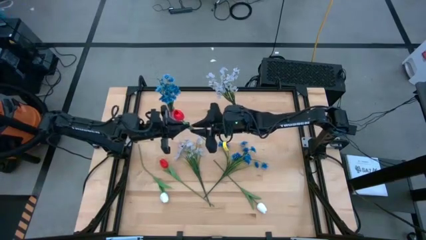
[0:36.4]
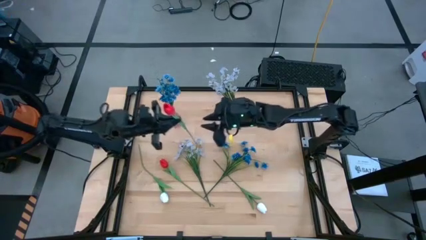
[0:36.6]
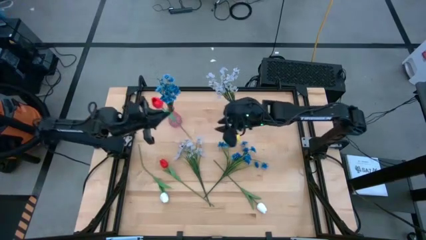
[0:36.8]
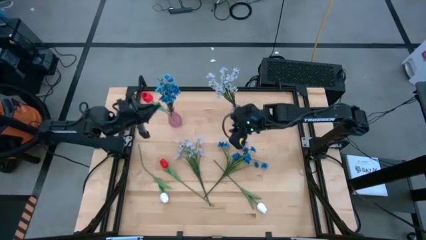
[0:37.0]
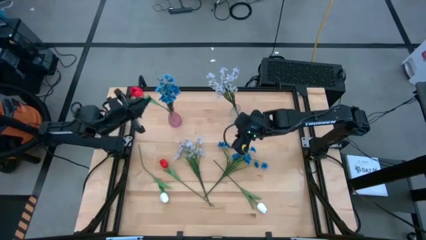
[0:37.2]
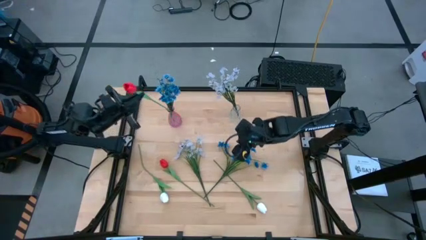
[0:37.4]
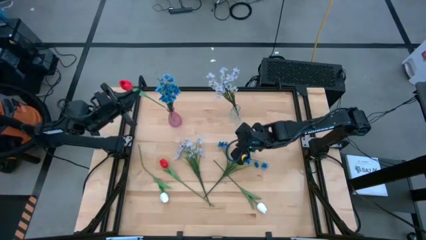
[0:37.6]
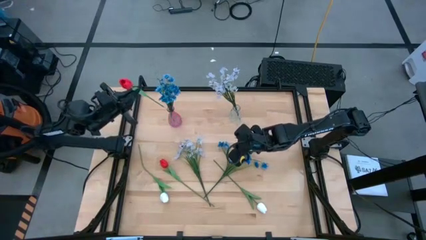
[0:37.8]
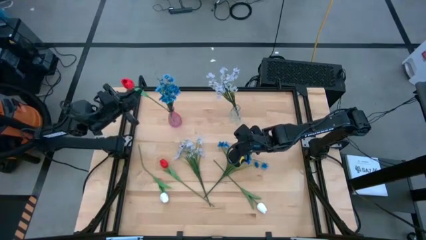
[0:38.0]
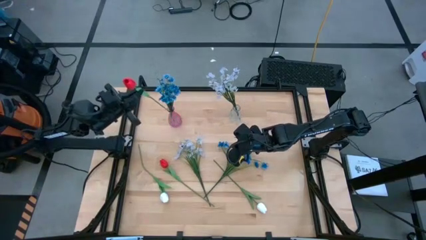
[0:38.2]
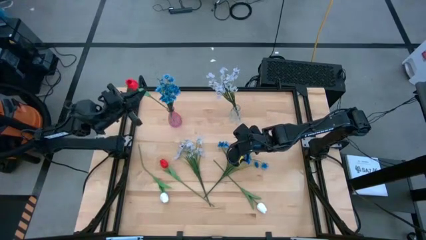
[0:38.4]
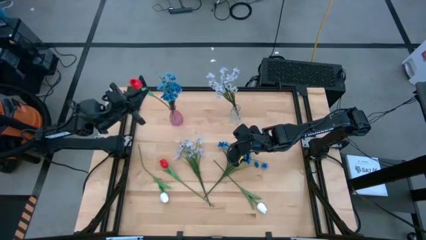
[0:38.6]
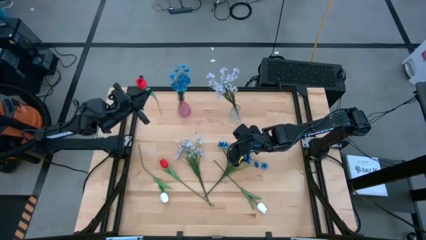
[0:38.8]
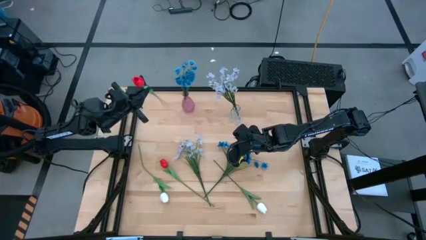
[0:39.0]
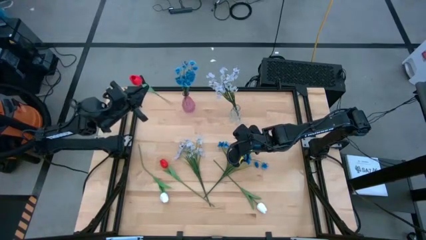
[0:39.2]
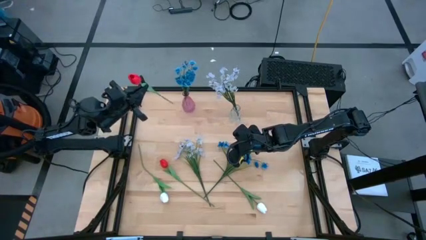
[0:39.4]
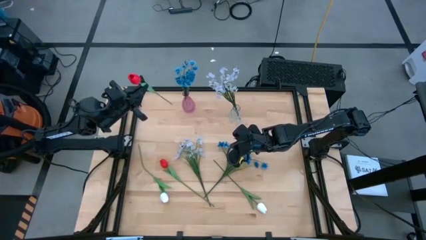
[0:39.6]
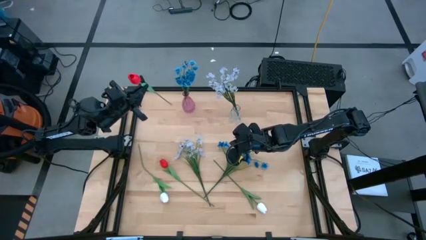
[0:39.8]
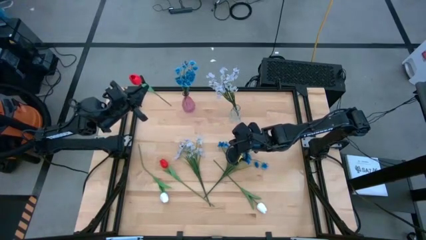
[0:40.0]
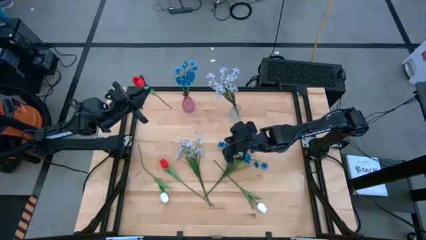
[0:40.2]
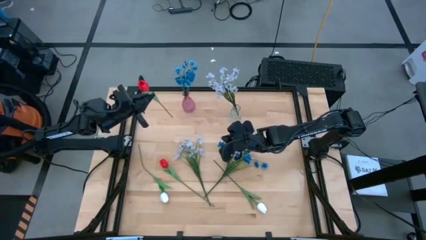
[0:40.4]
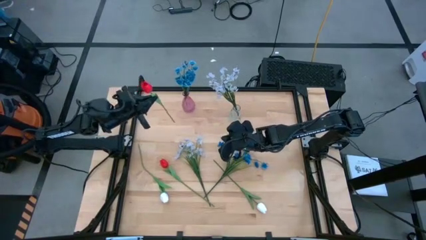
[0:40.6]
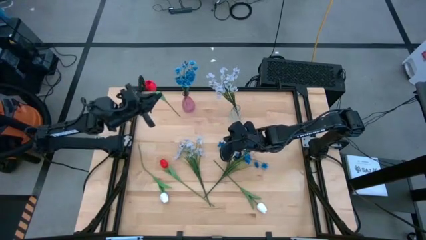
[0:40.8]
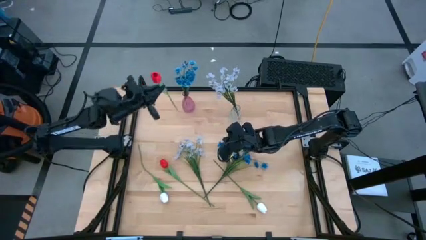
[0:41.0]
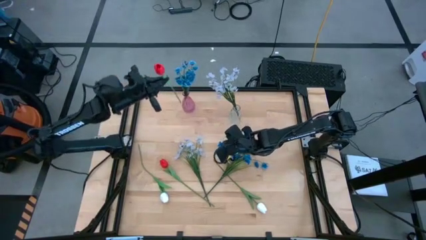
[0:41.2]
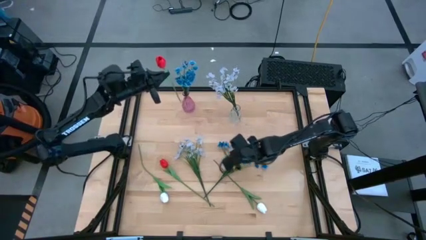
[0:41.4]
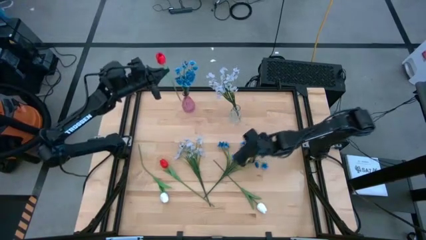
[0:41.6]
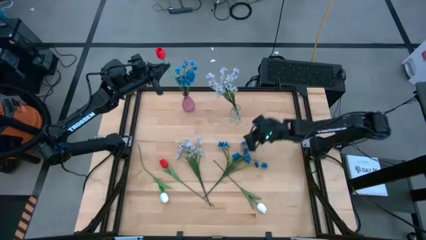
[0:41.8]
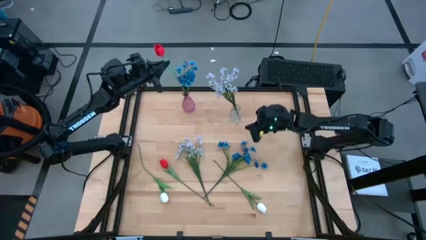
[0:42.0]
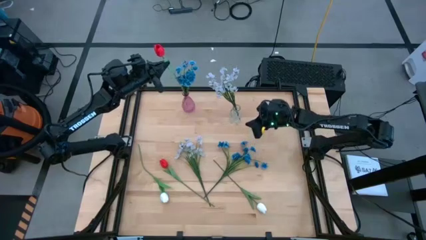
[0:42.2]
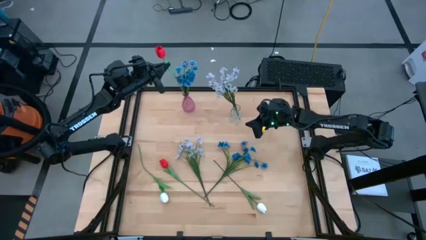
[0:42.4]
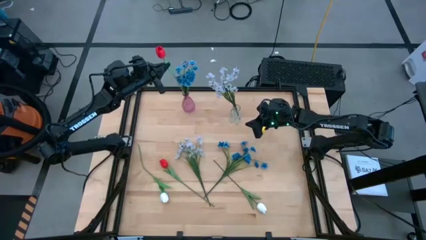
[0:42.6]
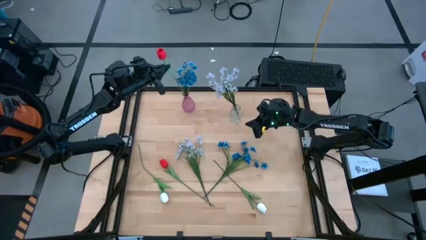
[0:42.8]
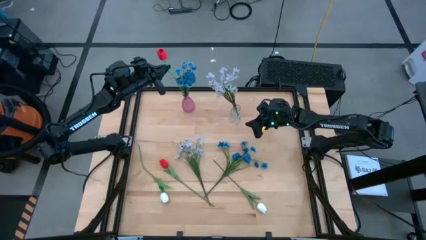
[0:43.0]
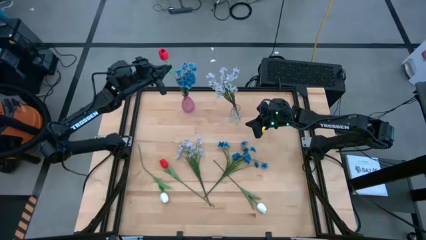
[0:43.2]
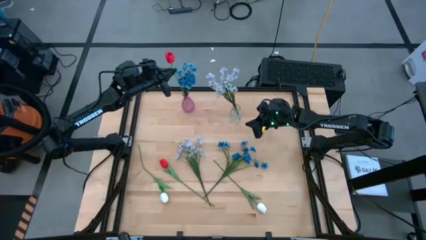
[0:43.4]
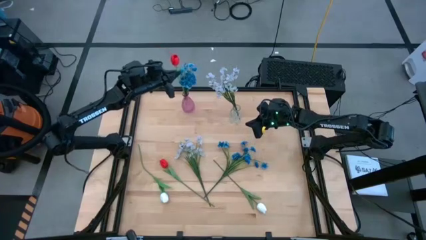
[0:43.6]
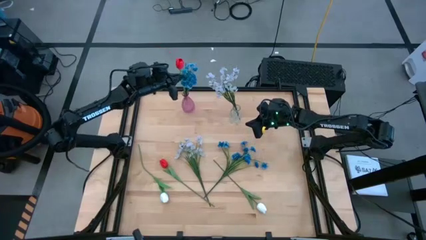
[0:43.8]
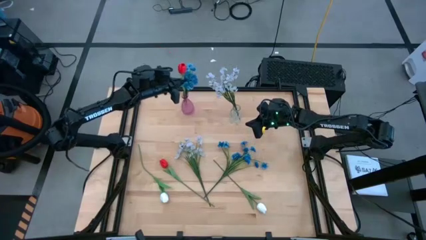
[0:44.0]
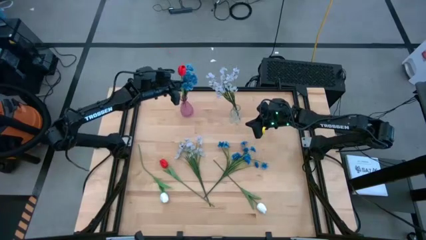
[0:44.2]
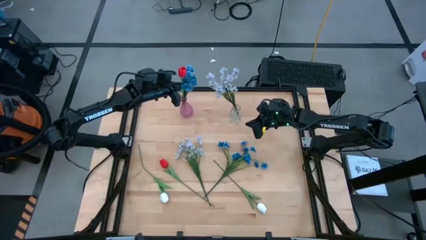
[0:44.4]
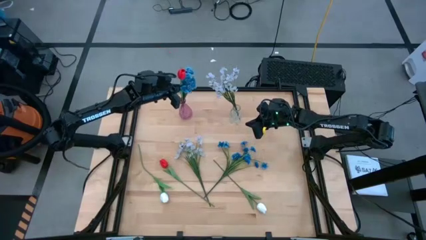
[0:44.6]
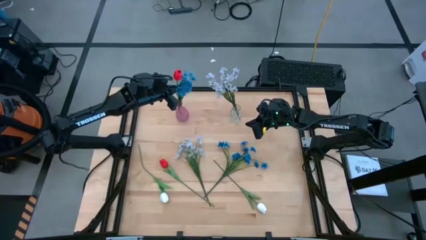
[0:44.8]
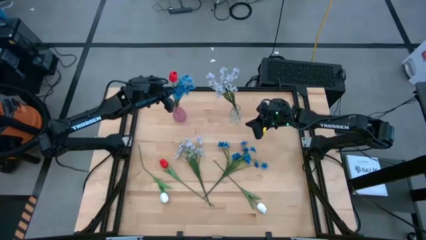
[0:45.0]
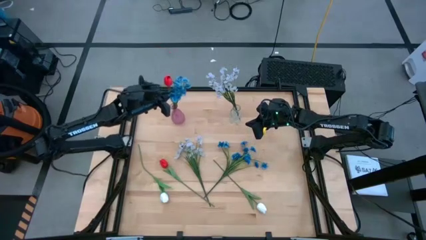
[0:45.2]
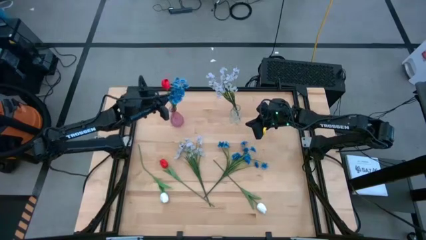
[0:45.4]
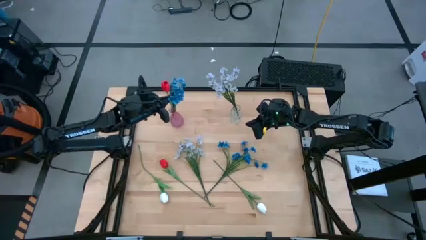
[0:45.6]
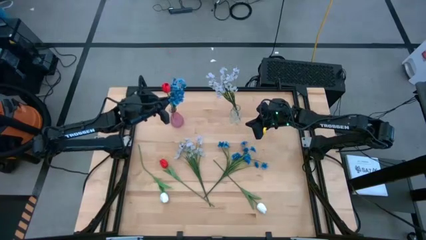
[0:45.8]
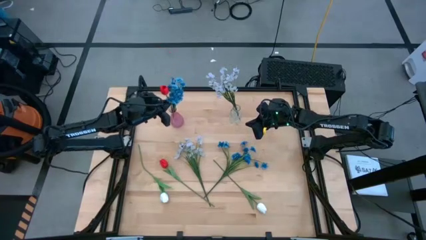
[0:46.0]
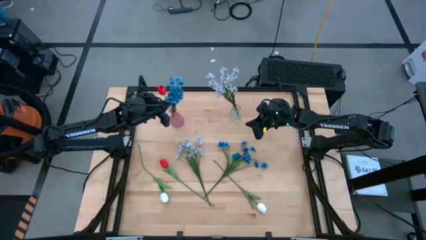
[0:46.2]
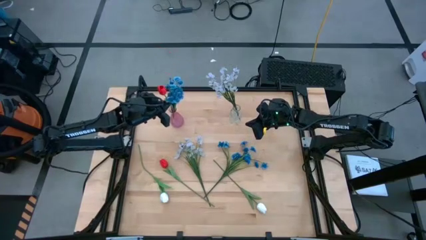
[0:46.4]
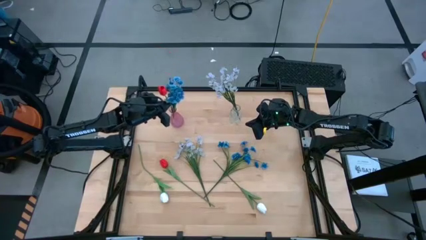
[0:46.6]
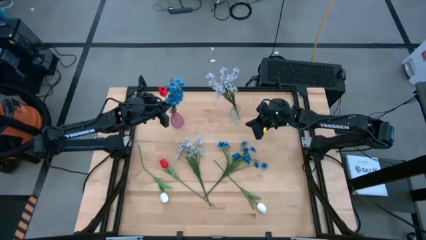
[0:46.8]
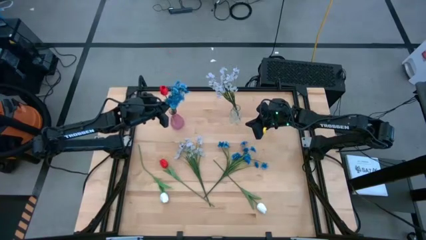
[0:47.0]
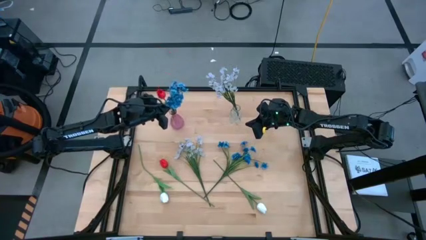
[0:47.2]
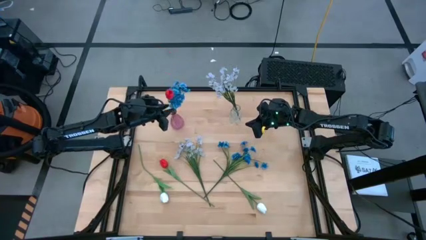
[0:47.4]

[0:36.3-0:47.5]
Task: Sort flowers into vase by color
Put the right red tulip into the pink vase
